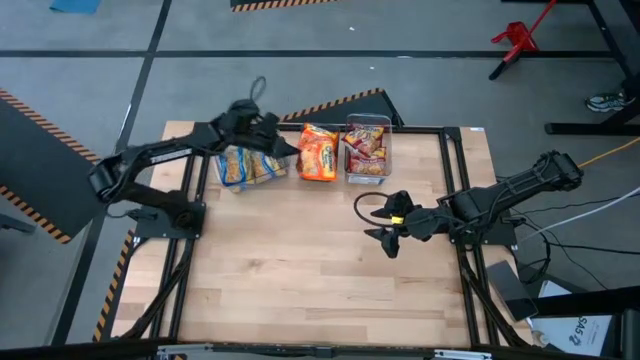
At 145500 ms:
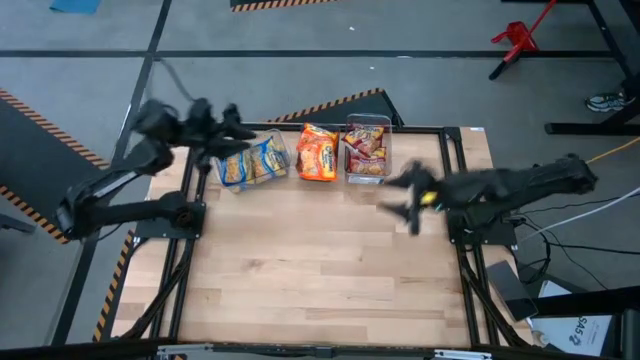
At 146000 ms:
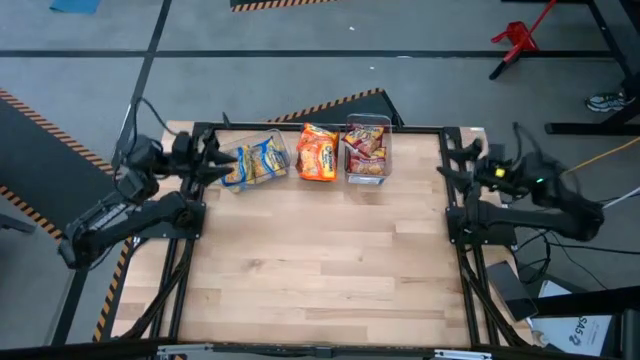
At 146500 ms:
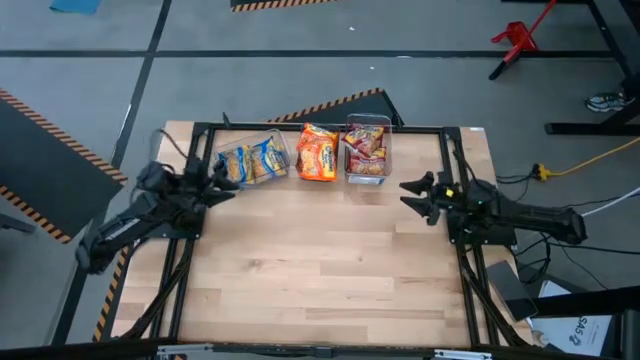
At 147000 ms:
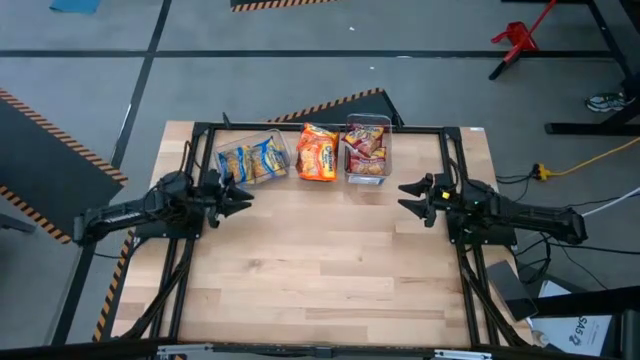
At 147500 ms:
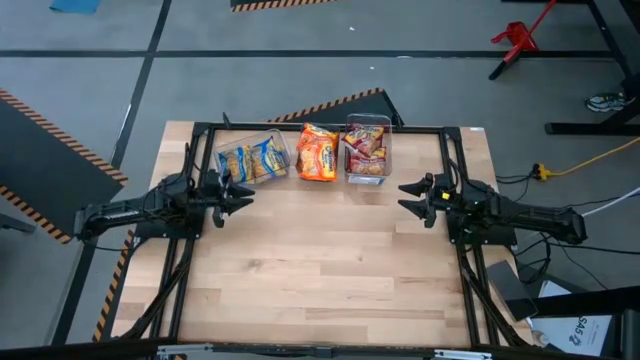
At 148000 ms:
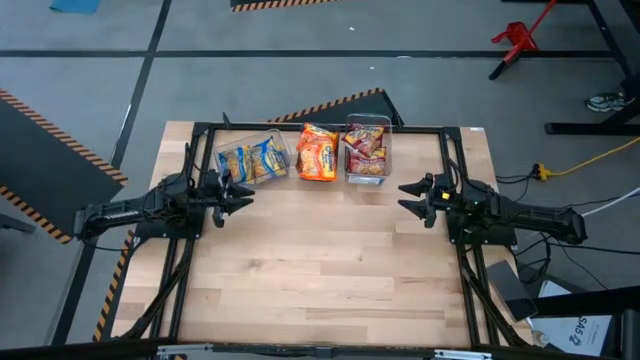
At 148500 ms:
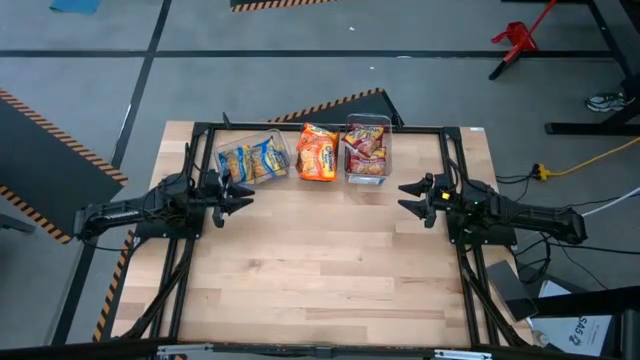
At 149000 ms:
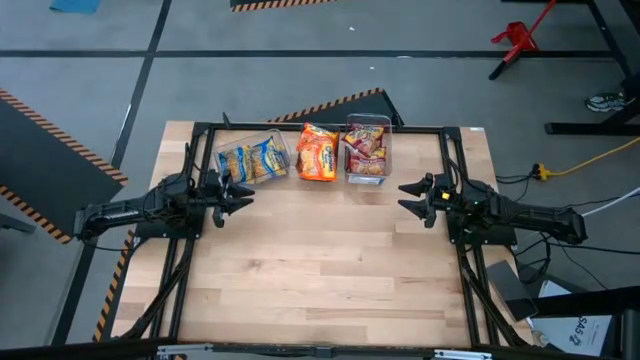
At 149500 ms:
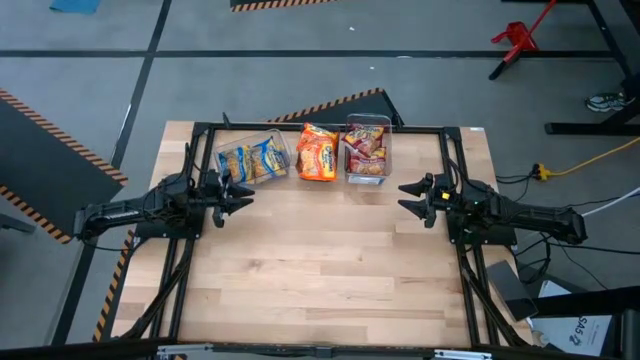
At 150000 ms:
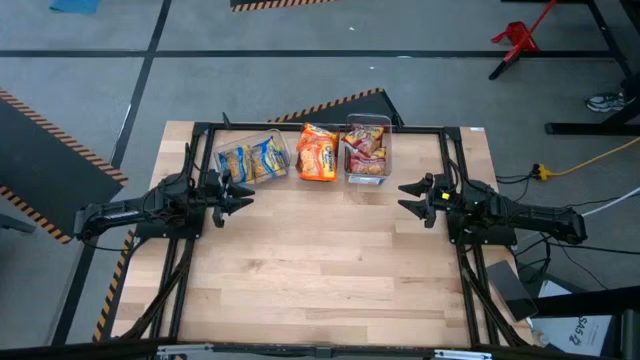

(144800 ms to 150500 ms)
Task: Sort Maruchan noodles
Return to Home Position

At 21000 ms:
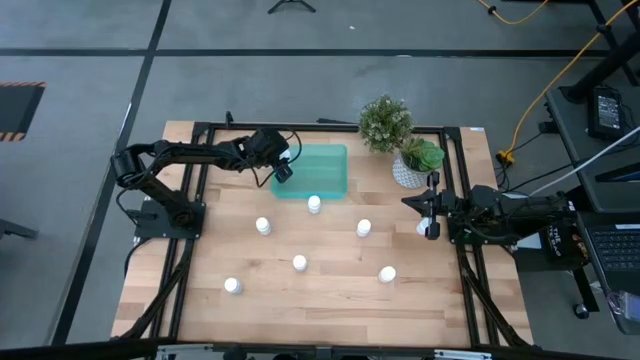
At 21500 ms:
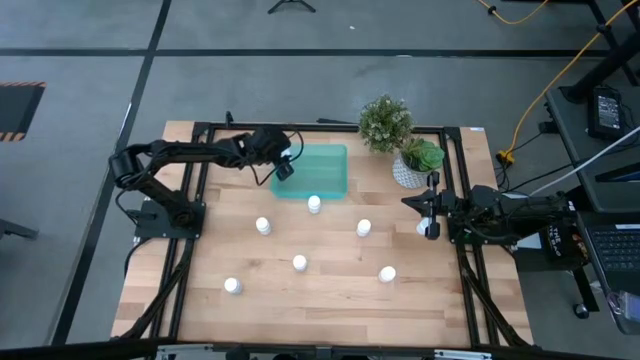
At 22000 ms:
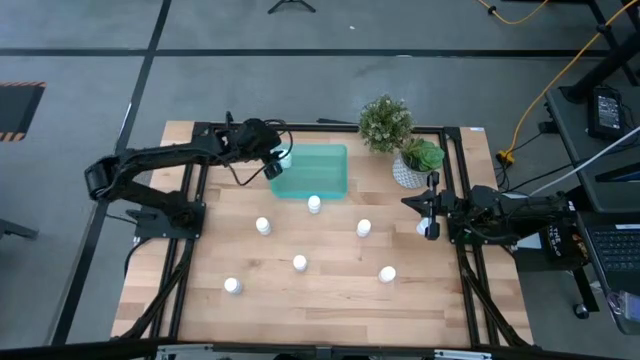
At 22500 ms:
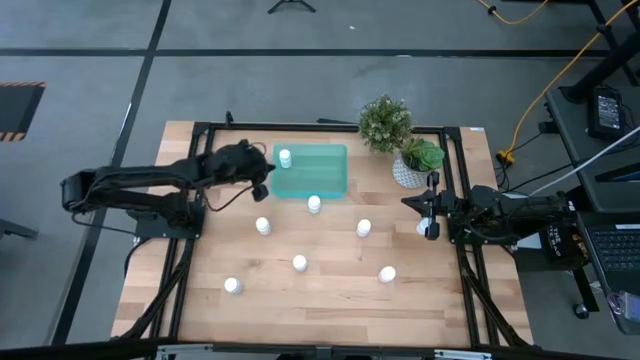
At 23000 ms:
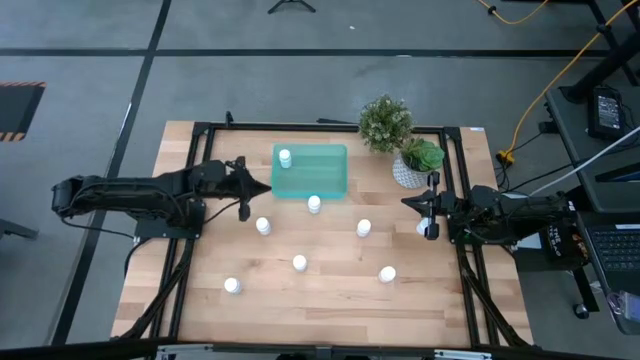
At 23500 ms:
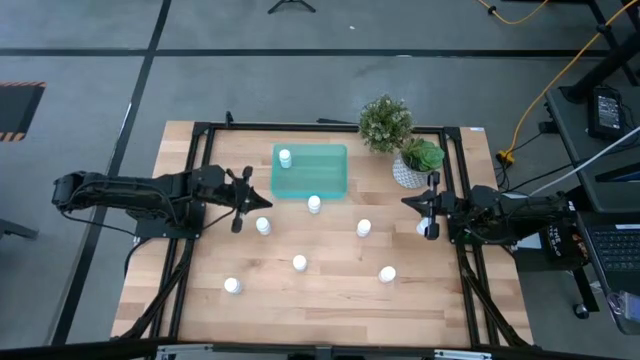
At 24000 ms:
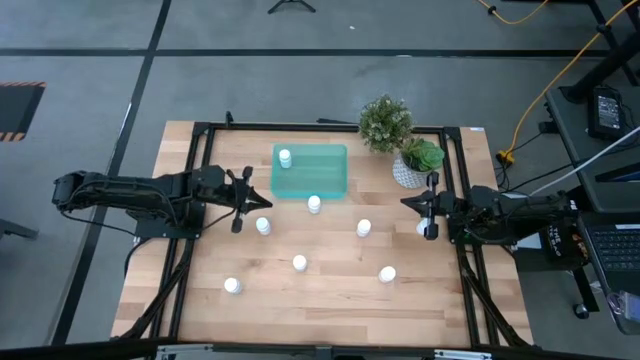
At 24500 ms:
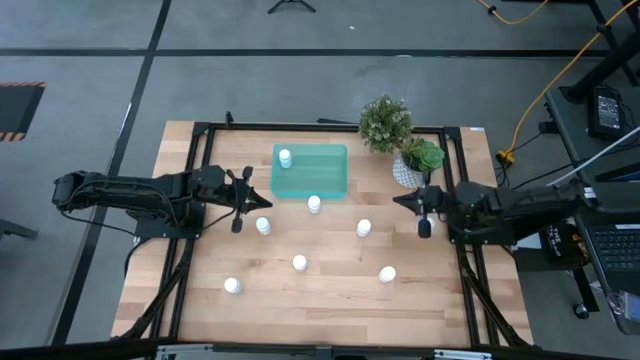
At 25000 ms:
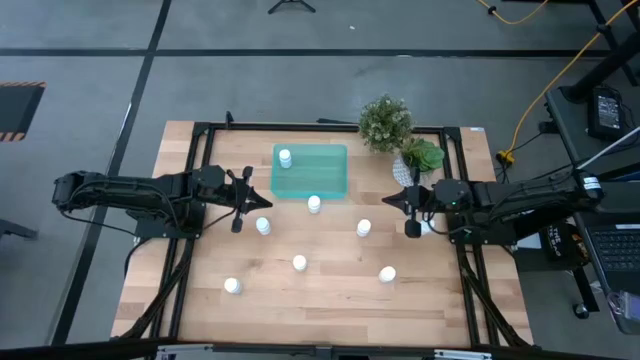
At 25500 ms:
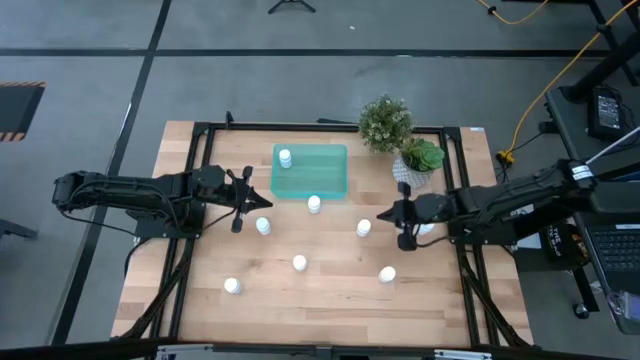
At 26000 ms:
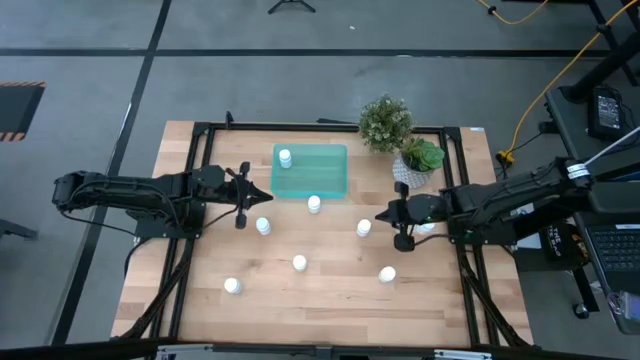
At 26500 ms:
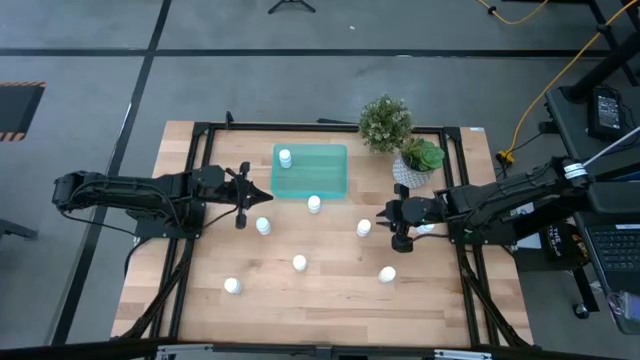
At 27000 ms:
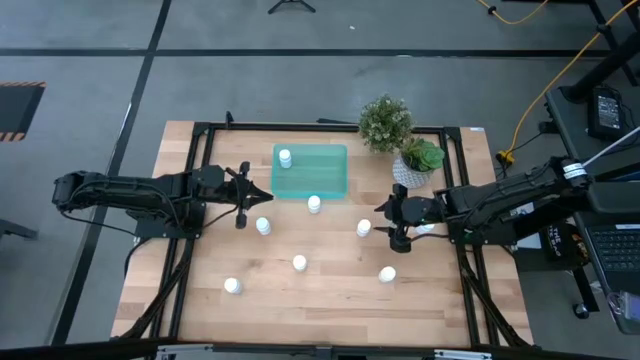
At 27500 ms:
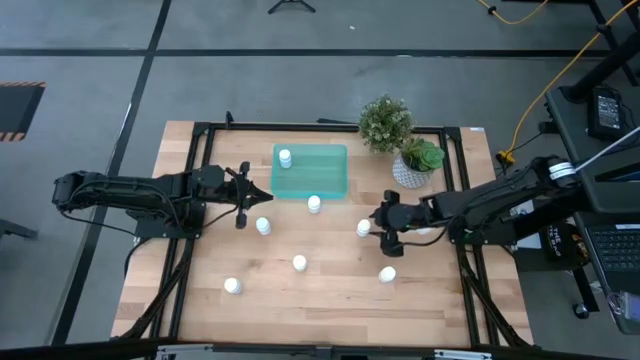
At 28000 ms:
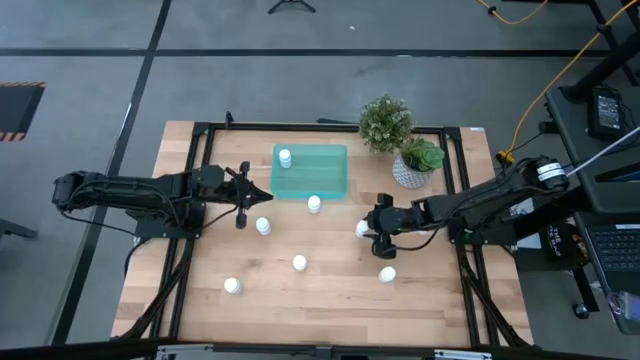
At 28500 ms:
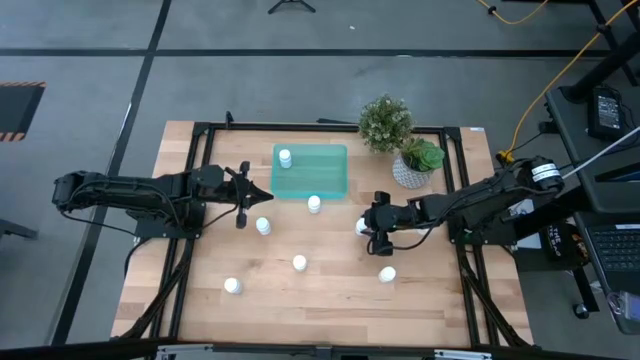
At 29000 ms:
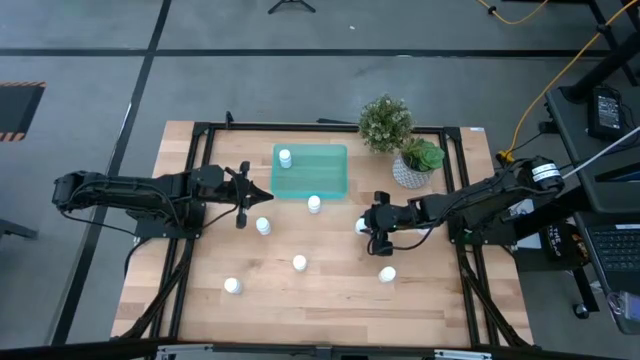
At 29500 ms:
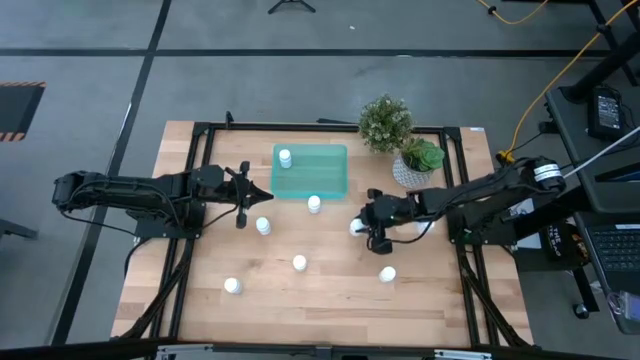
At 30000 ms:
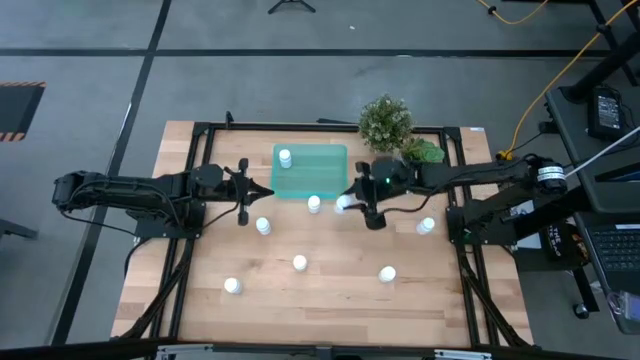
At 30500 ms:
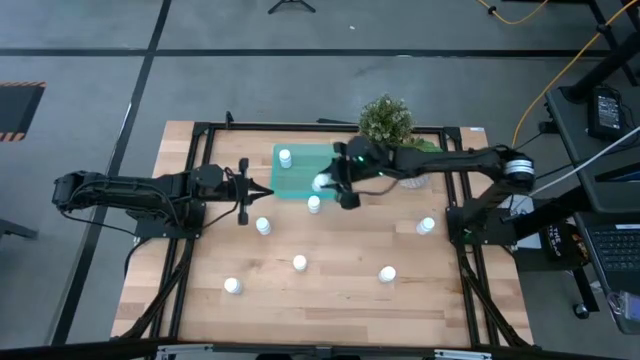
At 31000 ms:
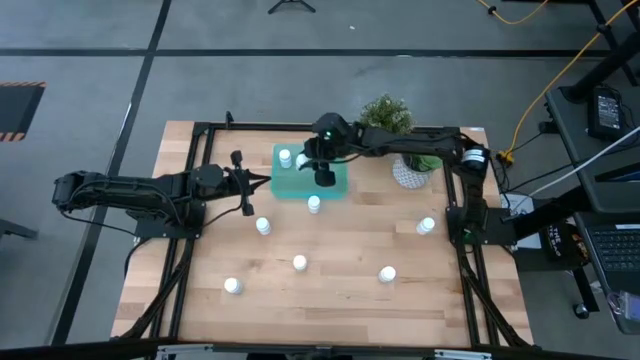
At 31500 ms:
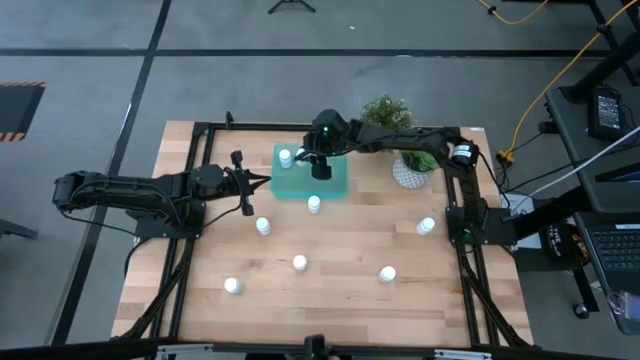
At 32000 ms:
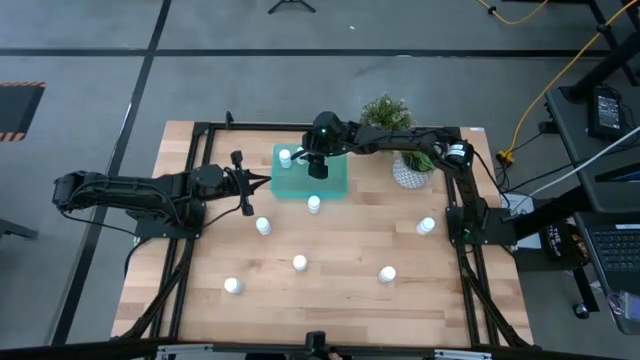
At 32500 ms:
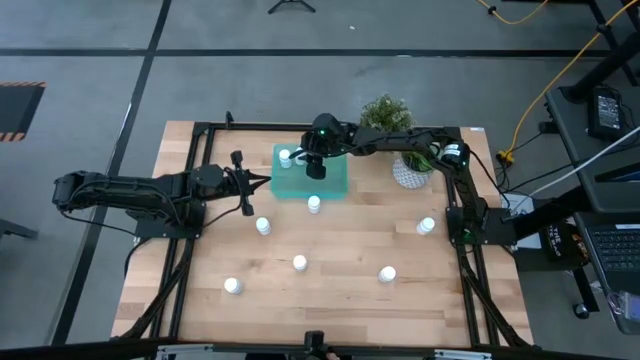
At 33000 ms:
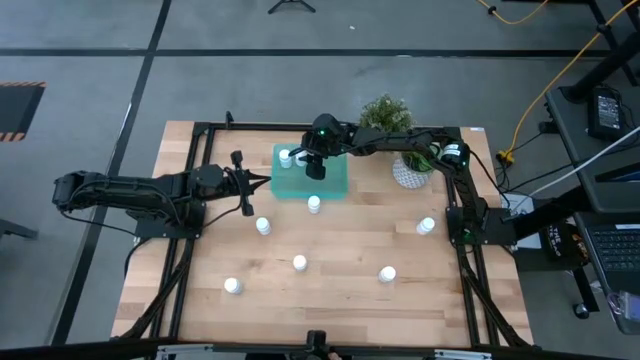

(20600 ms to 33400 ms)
Task: Pick and place pill bottles into a basket
Put the white pill bottle into the green bin
